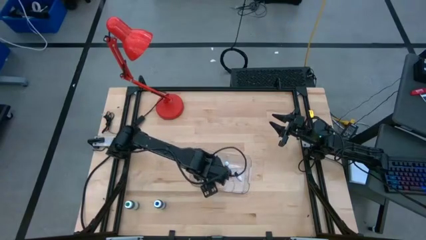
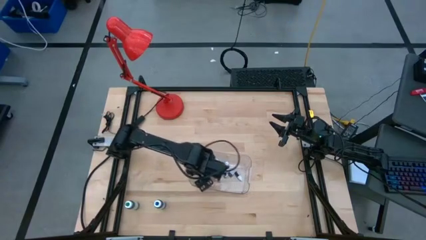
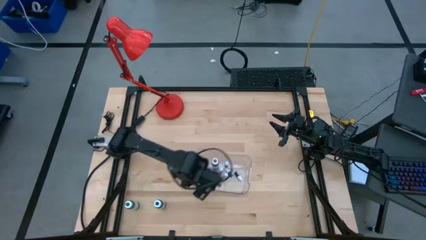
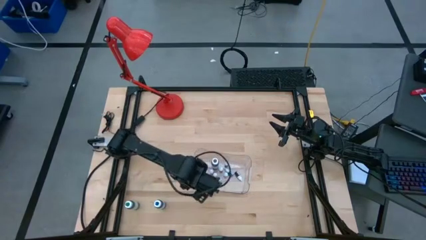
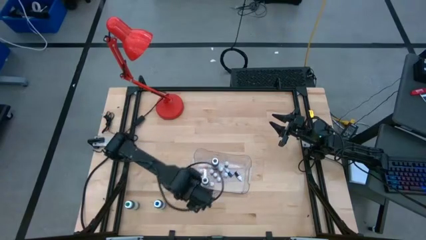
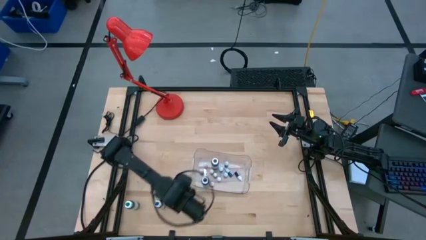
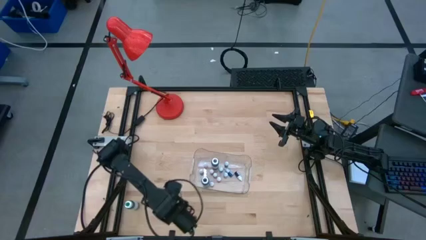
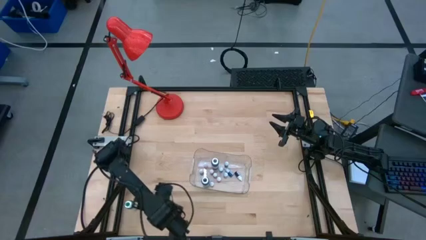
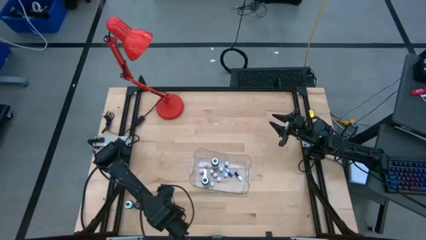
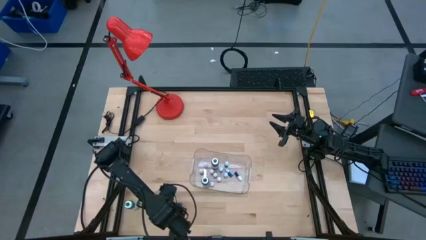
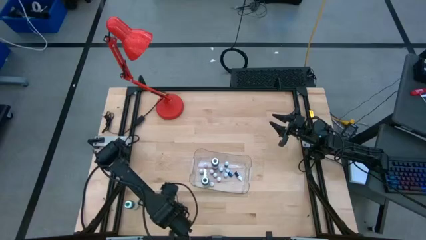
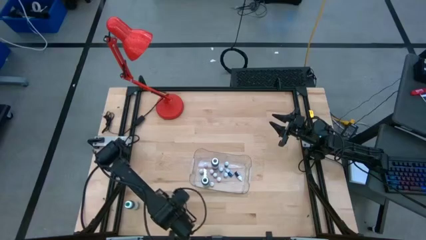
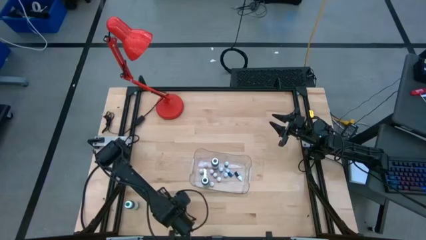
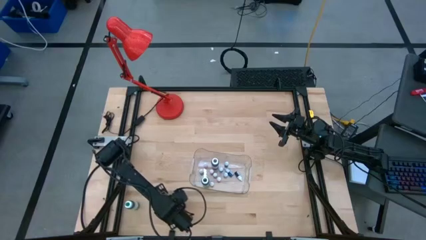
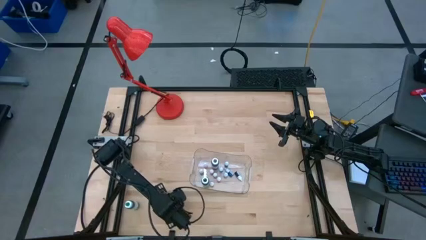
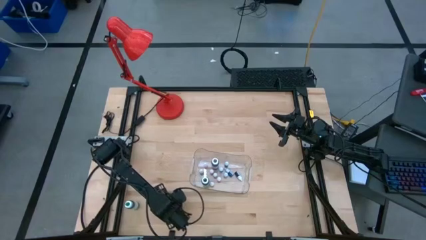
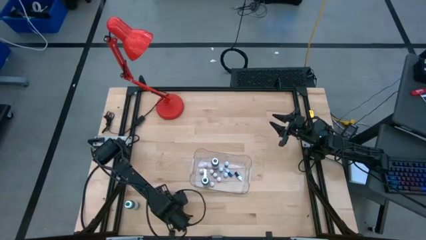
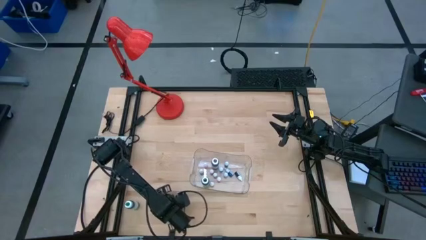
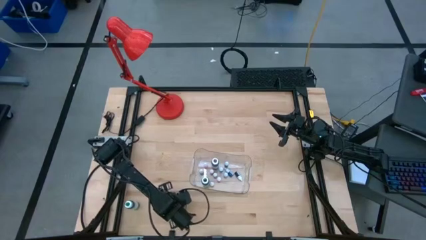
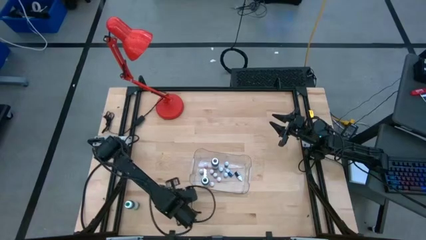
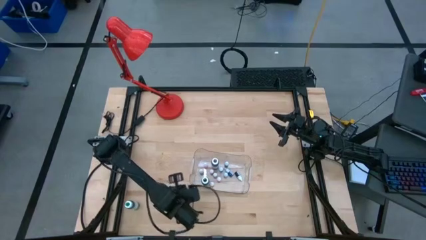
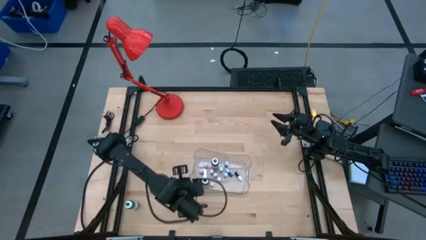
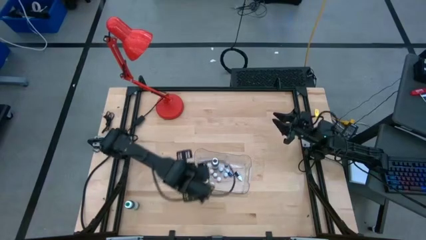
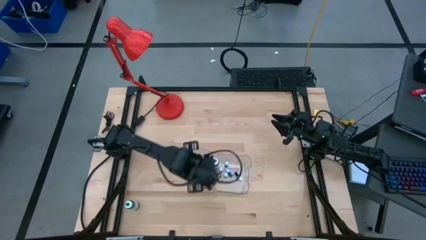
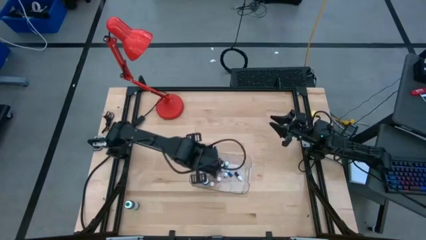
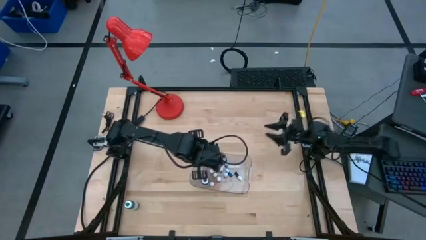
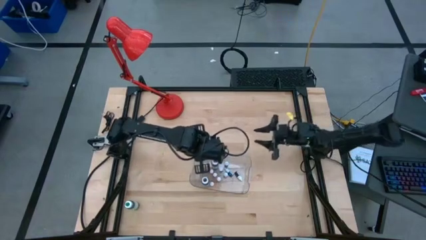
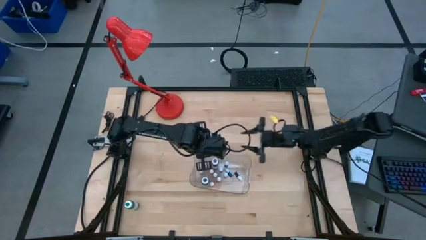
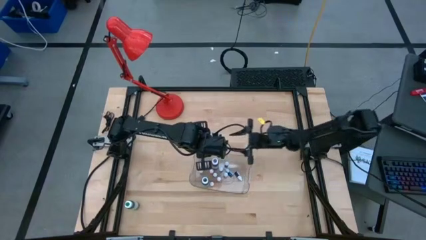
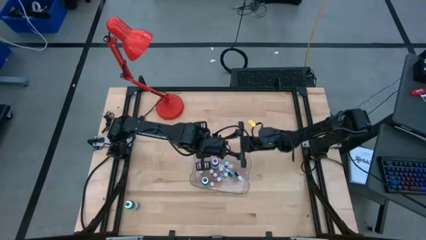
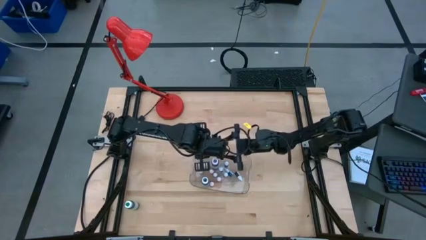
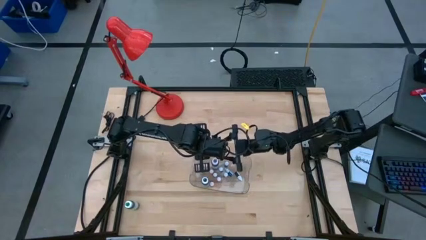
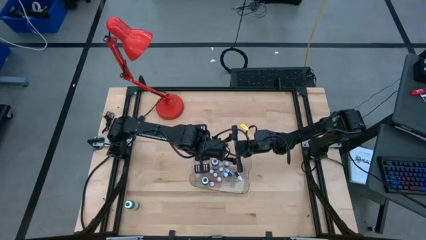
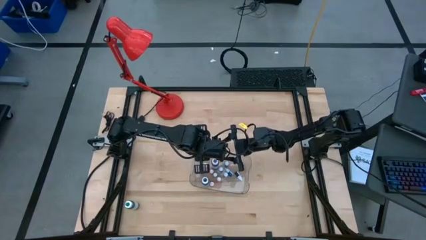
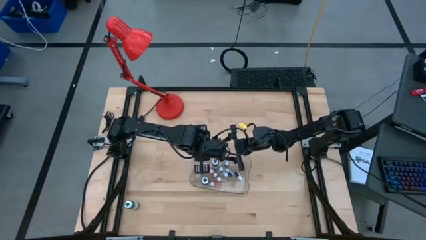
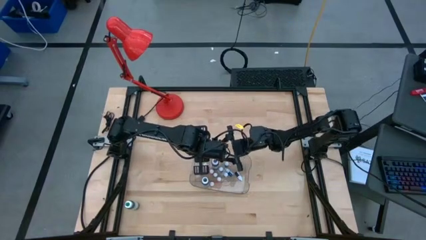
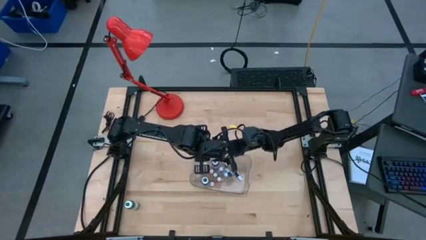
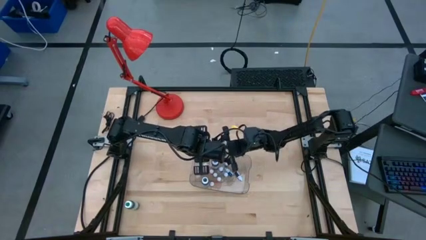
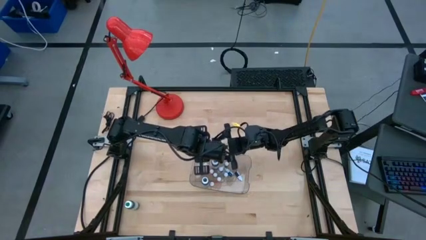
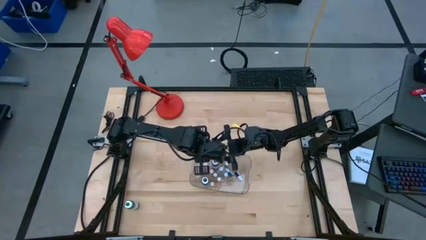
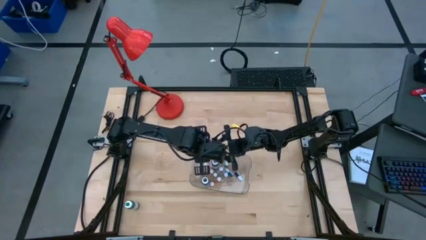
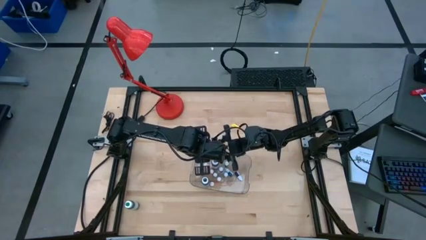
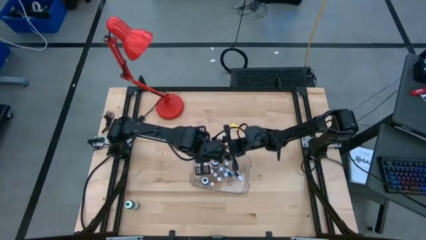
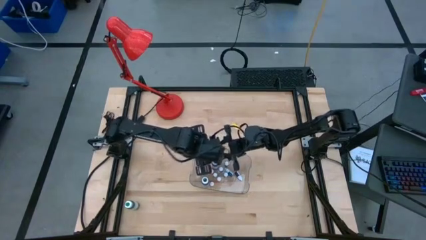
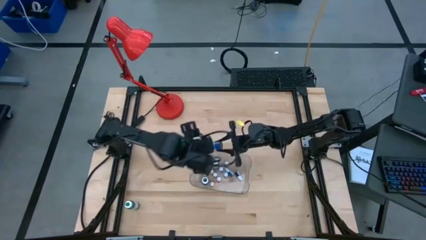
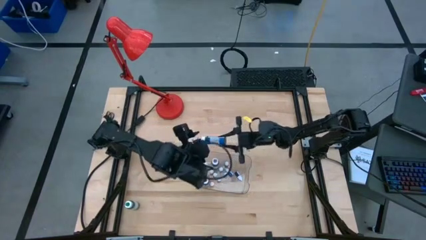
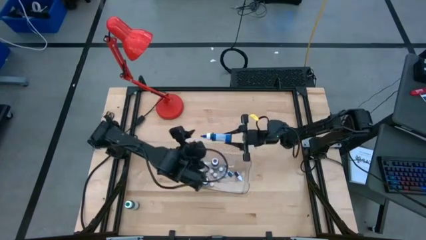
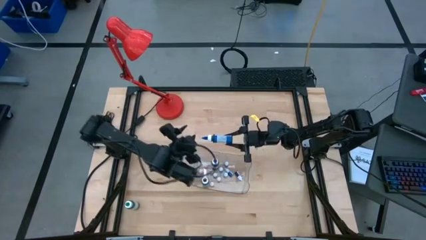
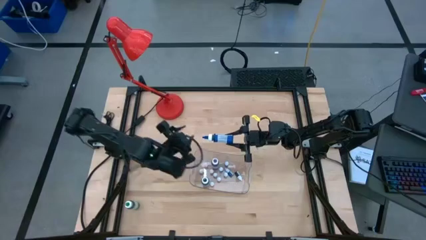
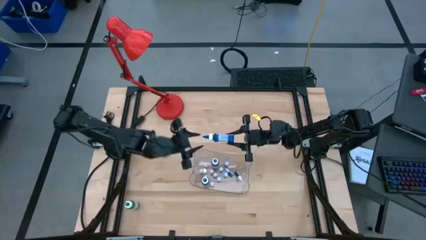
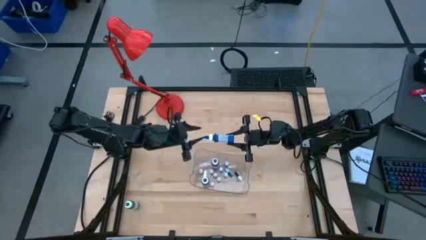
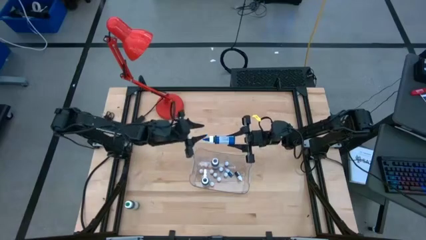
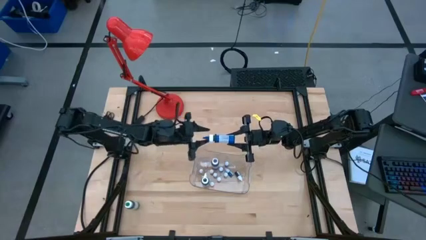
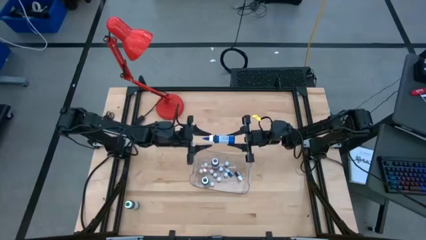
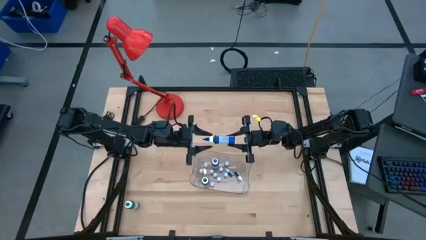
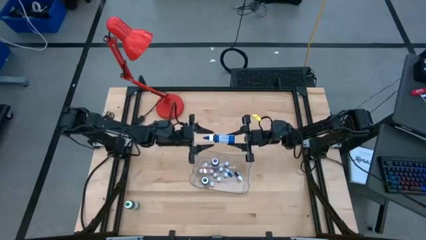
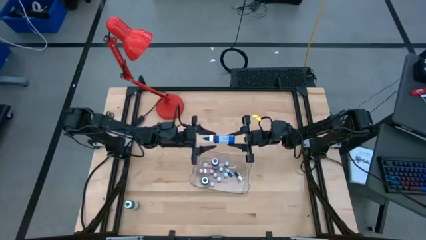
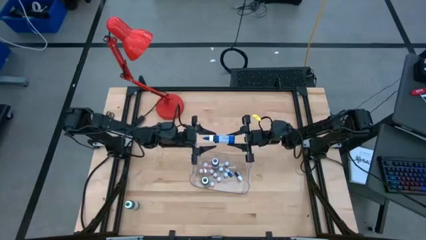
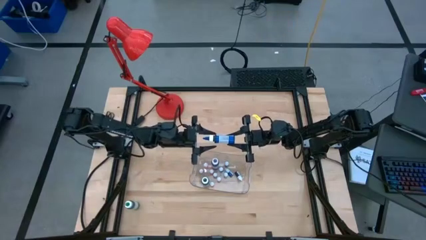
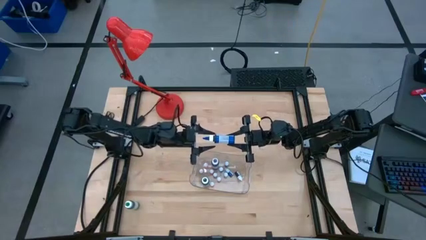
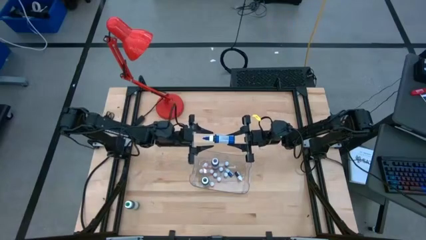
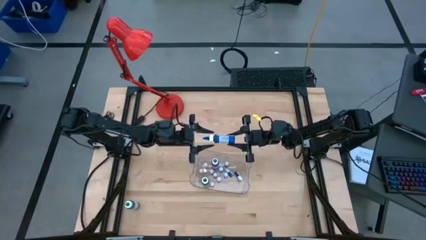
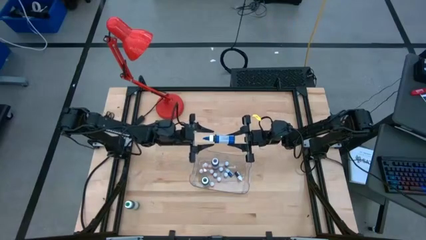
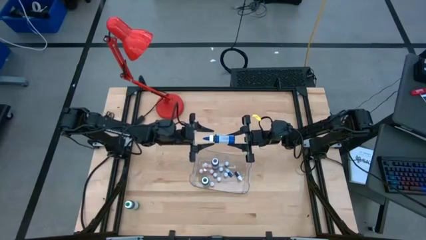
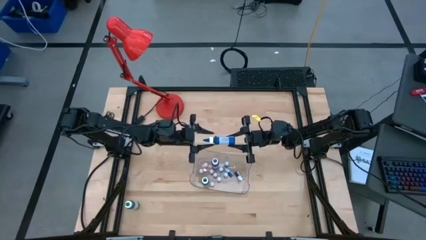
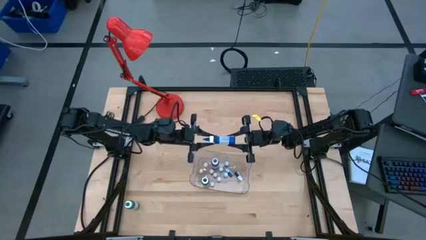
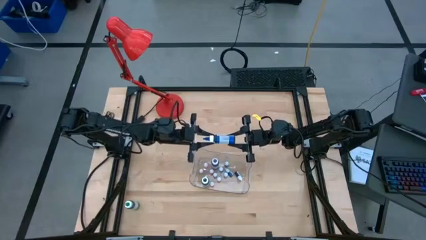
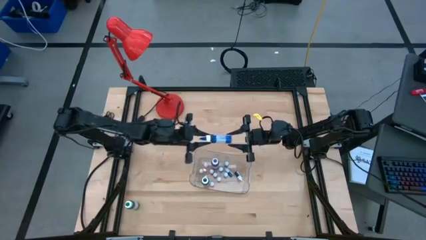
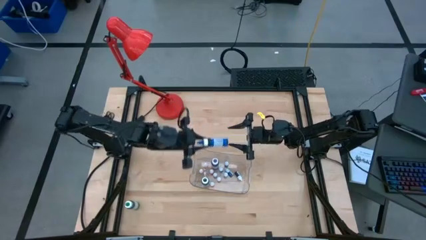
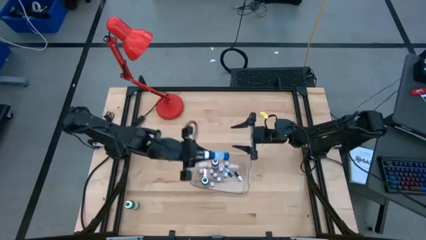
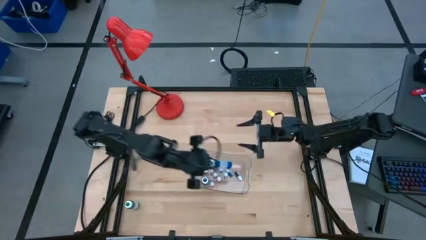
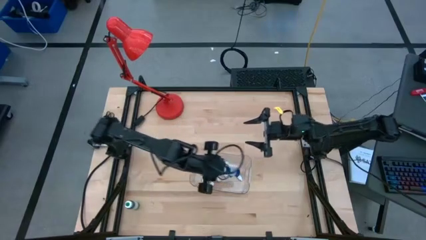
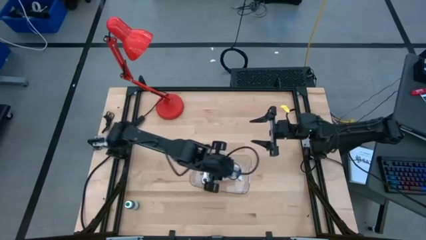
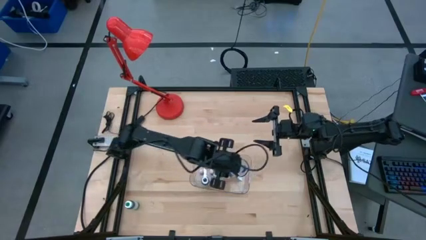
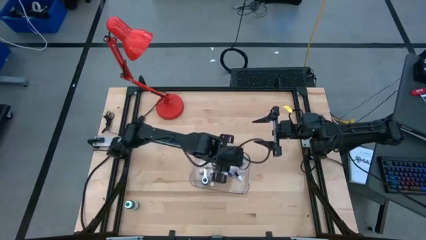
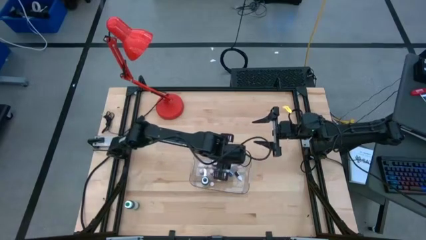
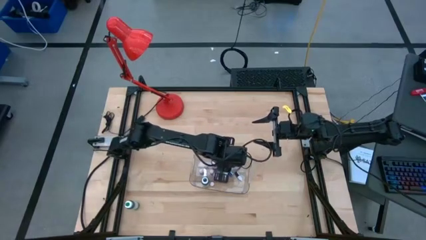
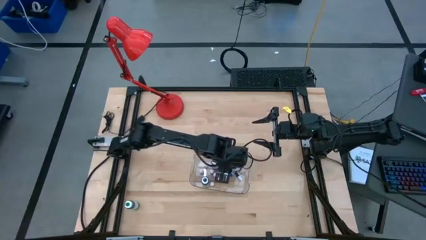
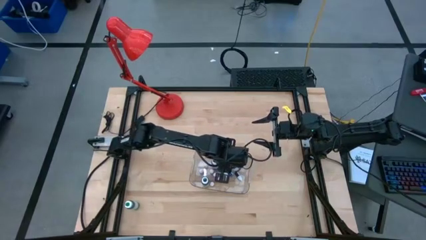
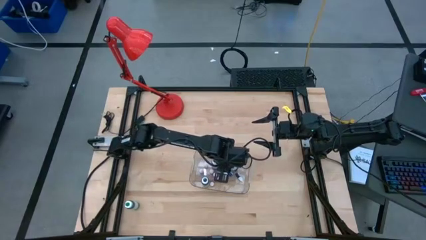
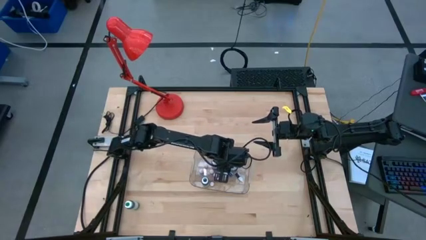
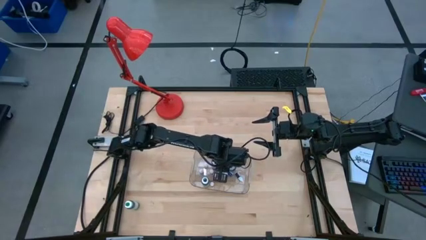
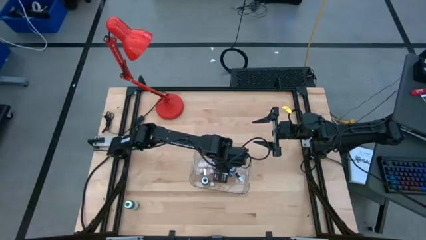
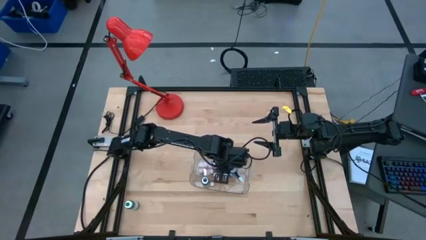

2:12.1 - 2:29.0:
Task: Pick & Place food coloring
Put the large blue food coloring bottle into the transparent bin
